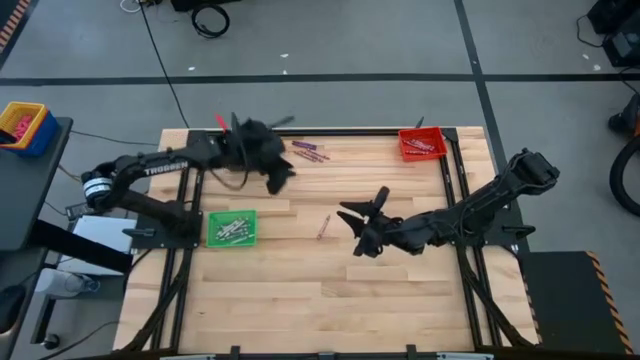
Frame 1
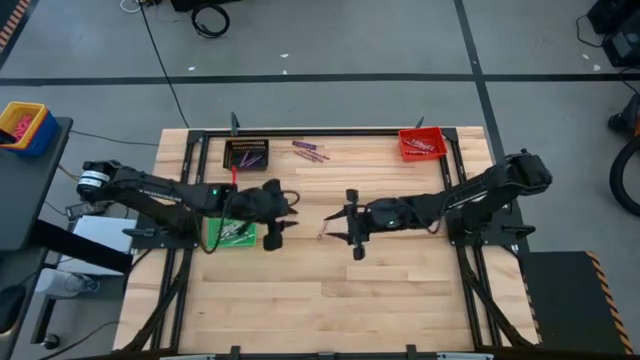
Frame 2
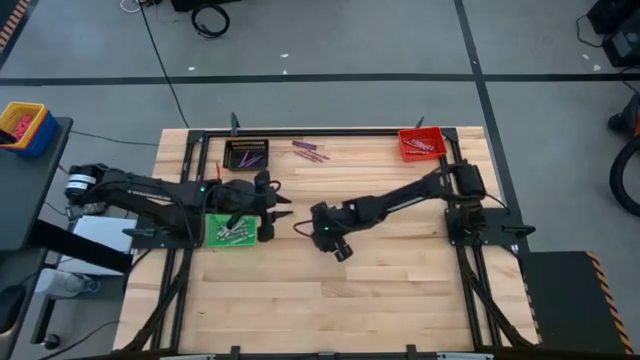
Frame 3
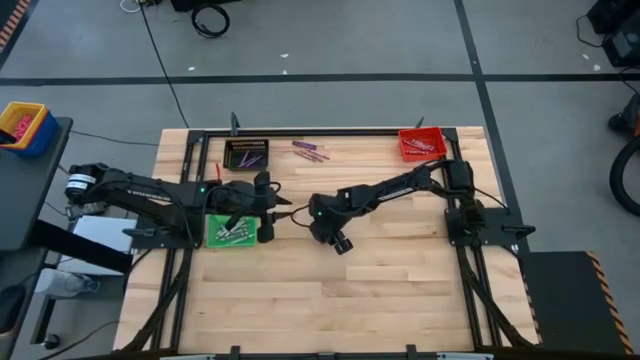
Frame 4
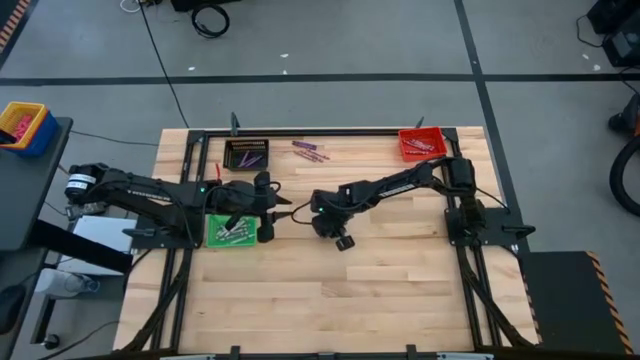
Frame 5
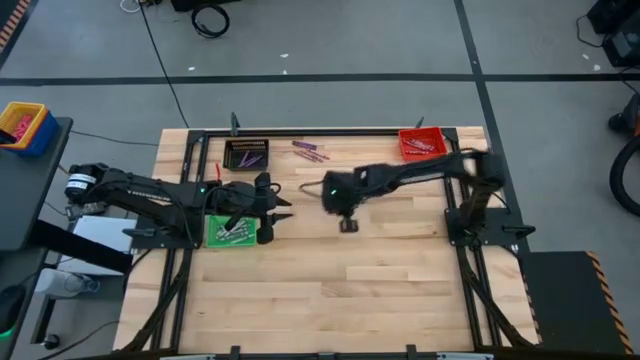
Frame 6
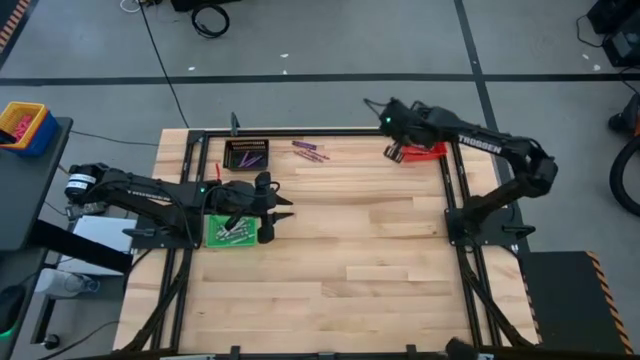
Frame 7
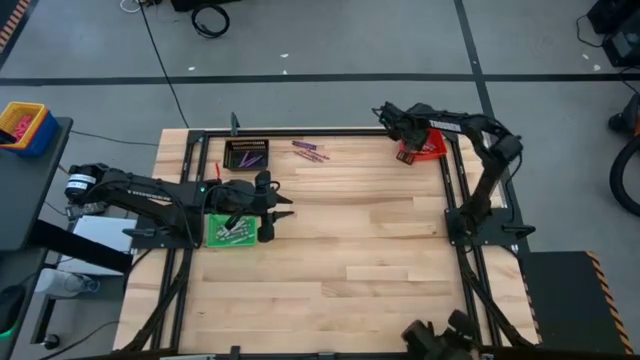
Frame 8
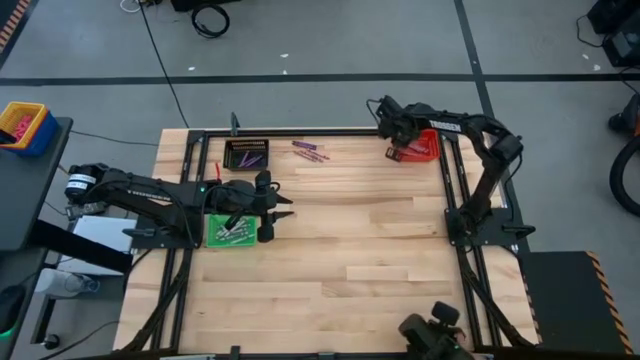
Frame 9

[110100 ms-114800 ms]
Task: Sort crayons
Put the pink crayon into the red bin

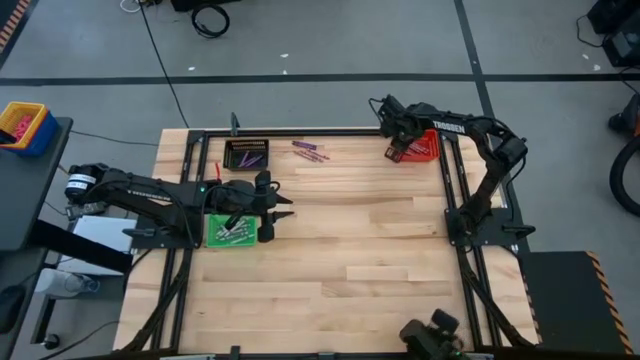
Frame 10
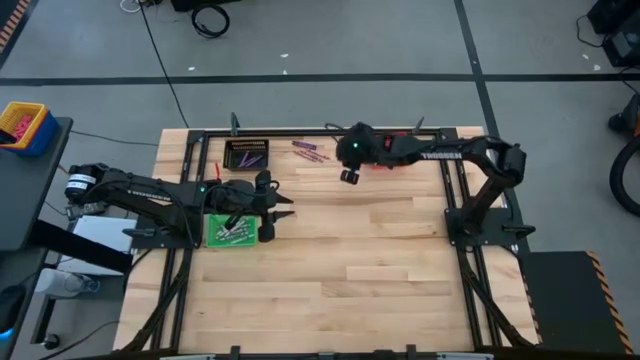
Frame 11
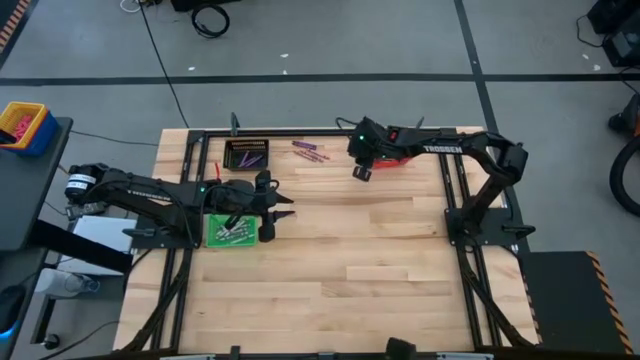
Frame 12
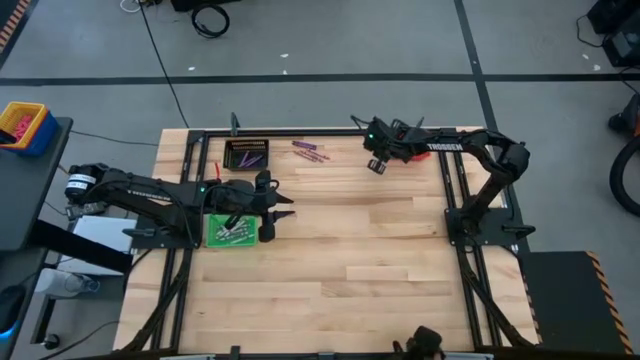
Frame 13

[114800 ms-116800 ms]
Adjust the red bin

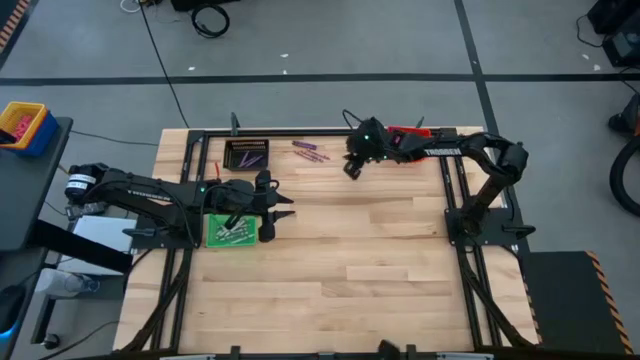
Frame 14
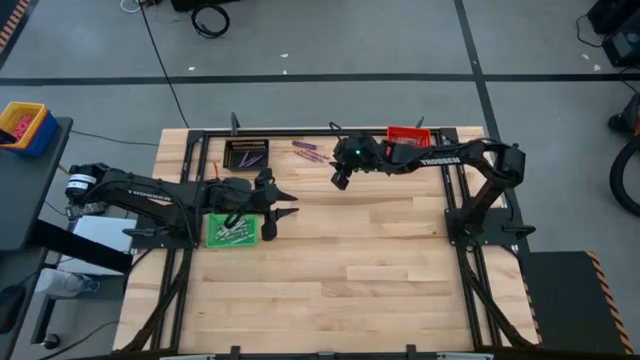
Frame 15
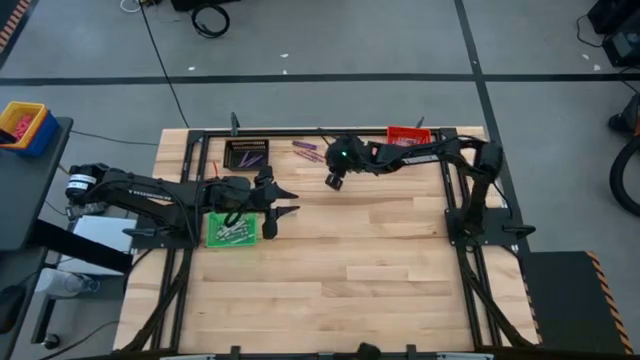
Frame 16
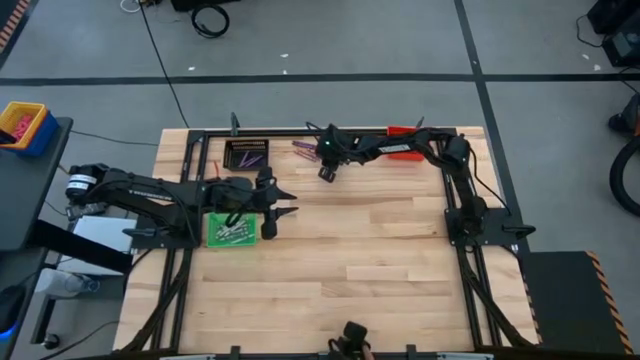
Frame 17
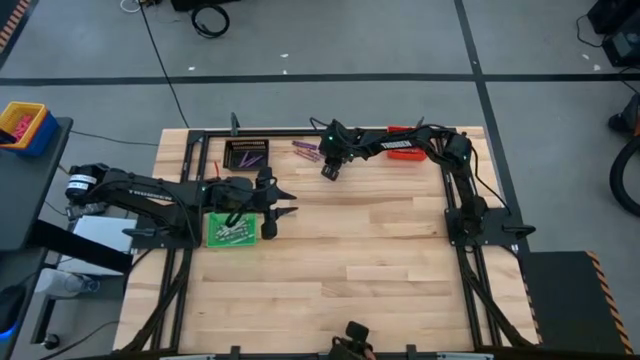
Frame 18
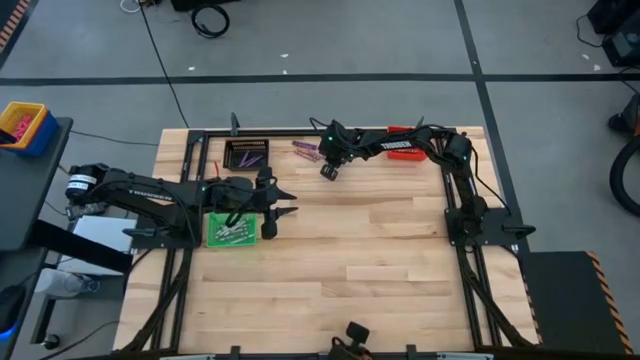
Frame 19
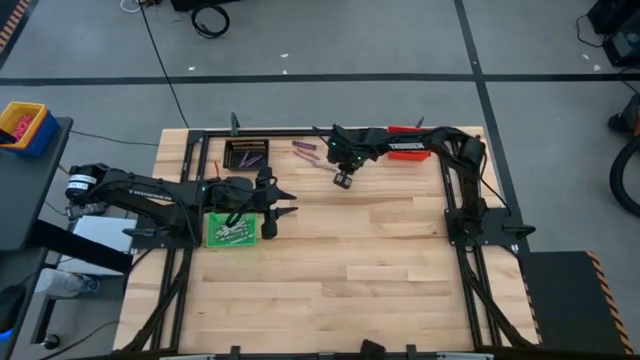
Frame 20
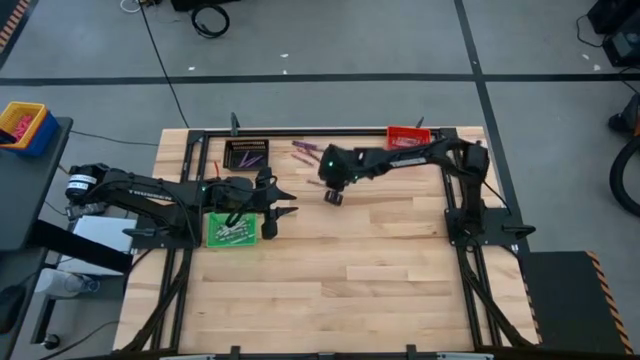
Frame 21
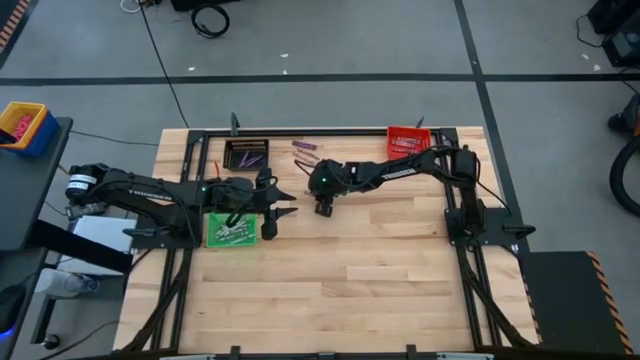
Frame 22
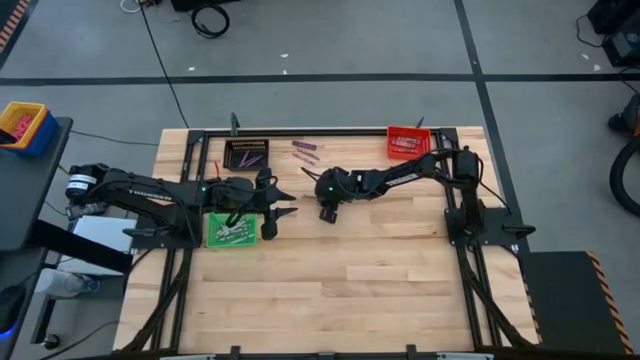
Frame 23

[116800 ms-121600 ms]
Put the pink crayon into the red bin

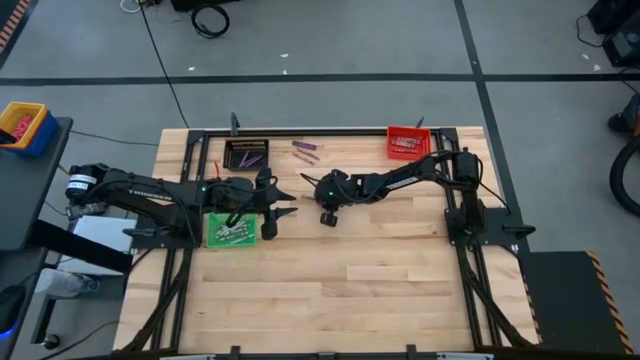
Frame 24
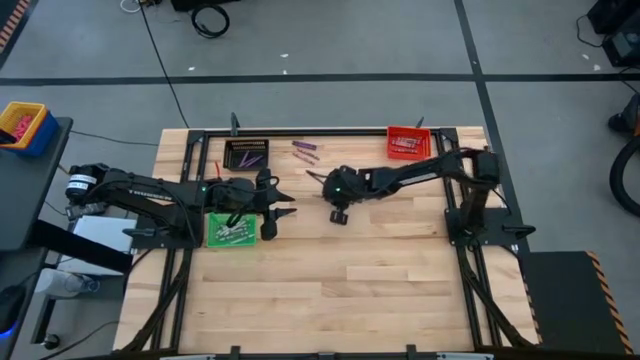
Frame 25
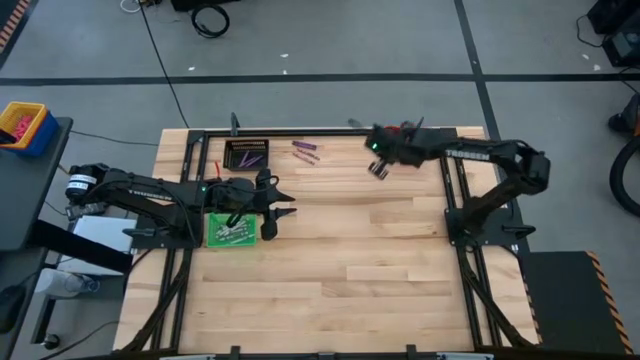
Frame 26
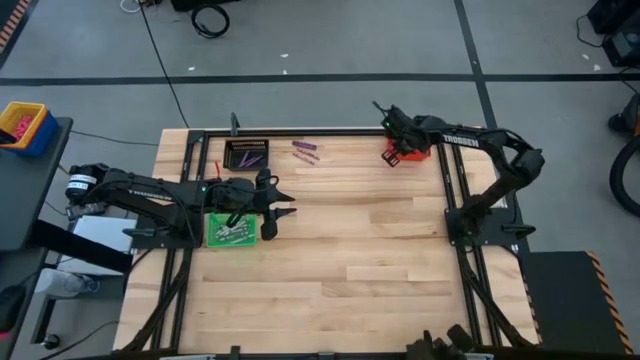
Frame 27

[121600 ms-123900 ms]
Put the pink crayon into the red bin

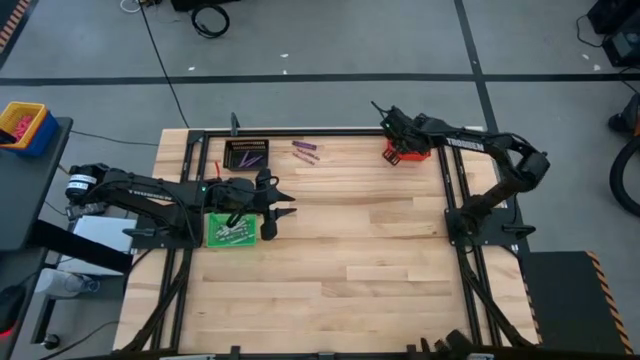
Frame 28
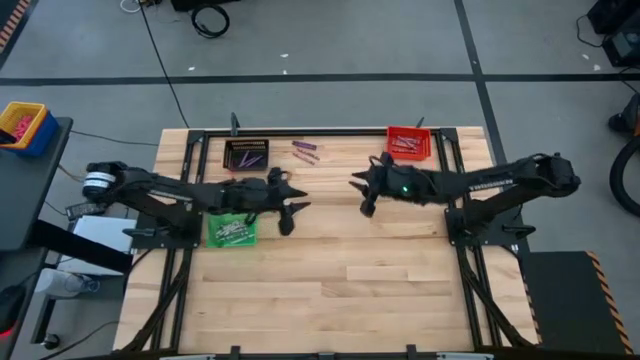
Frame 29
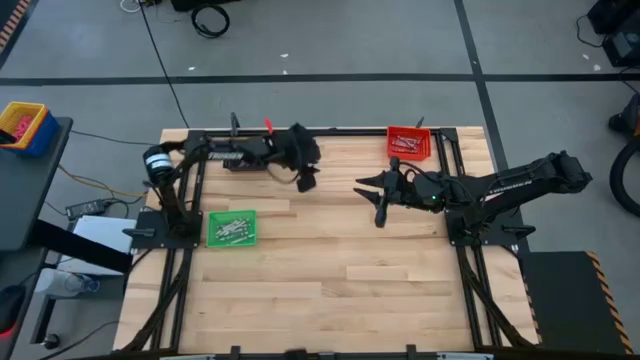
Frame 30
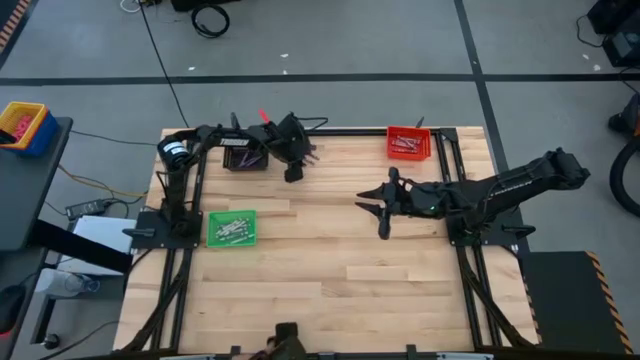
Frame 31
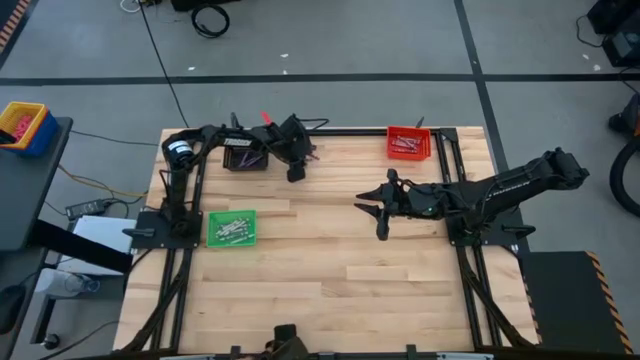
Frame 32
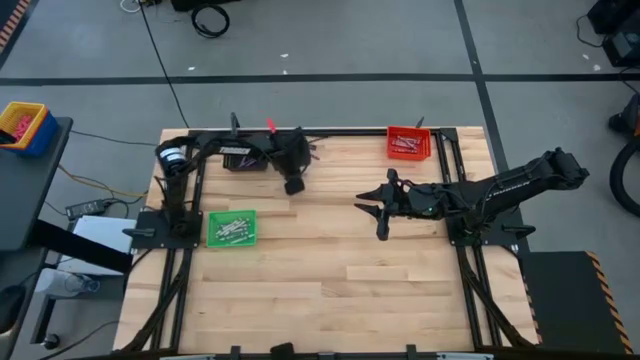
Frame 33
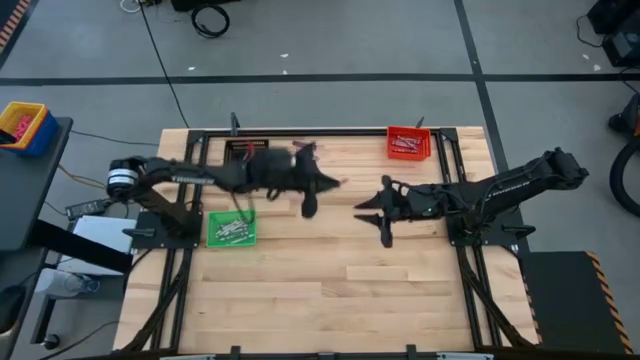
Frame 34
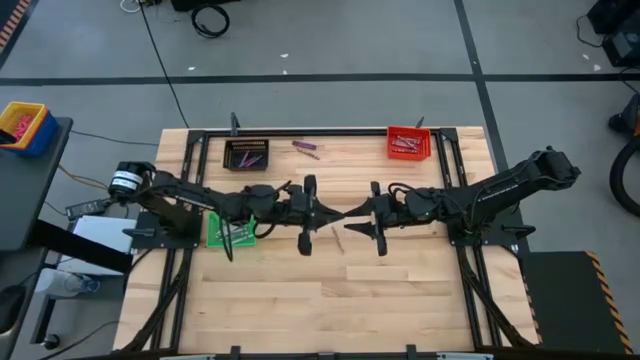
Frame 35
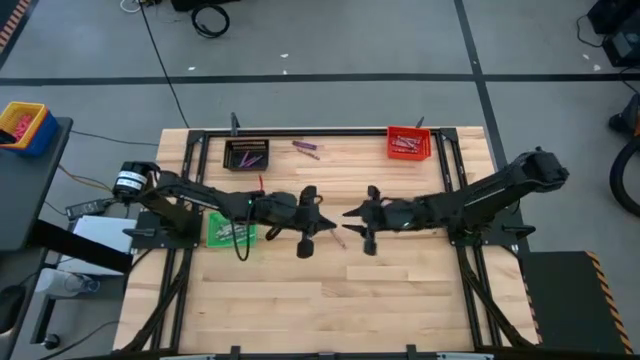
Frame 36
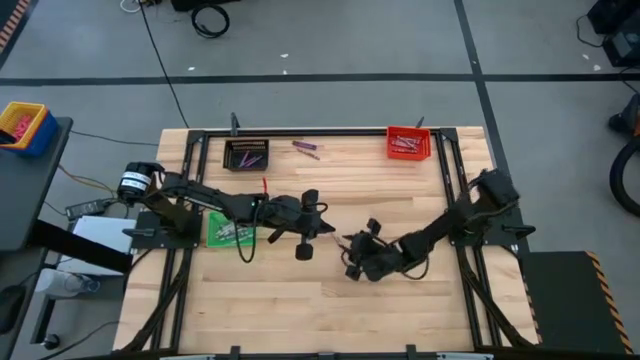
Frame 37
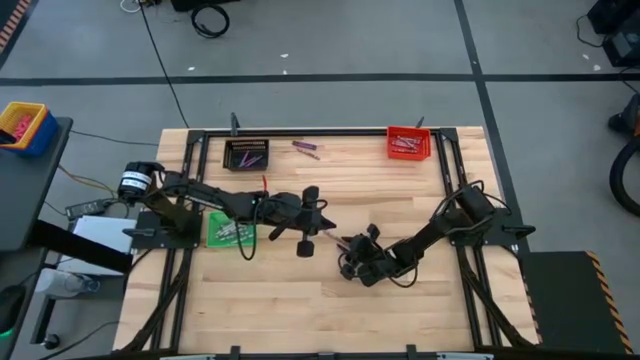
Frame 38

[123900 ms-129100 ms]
Put the pink crayon into the red bin

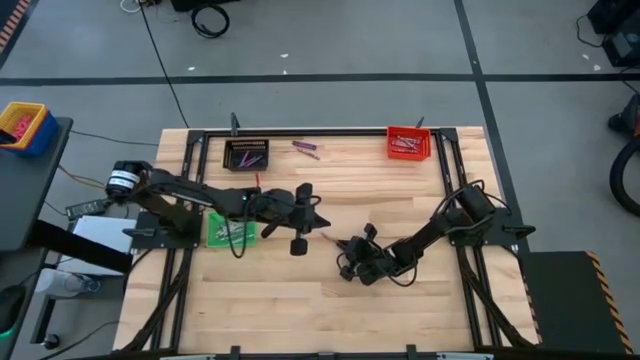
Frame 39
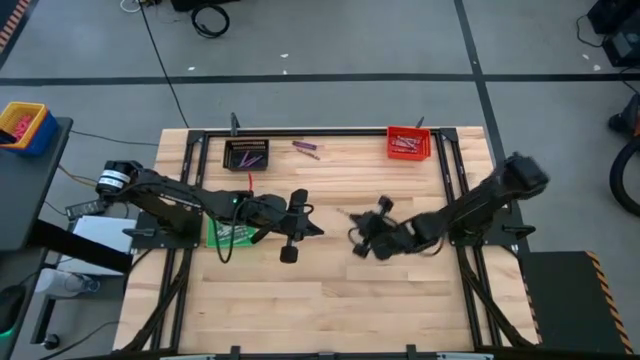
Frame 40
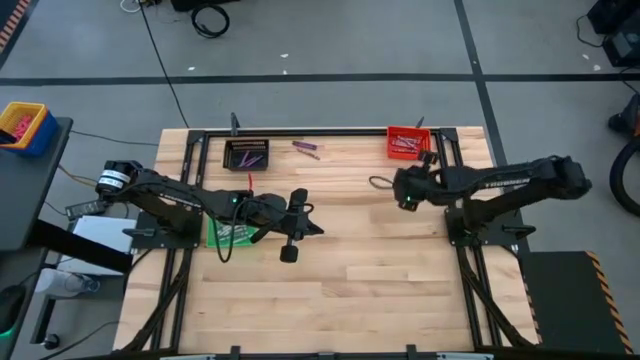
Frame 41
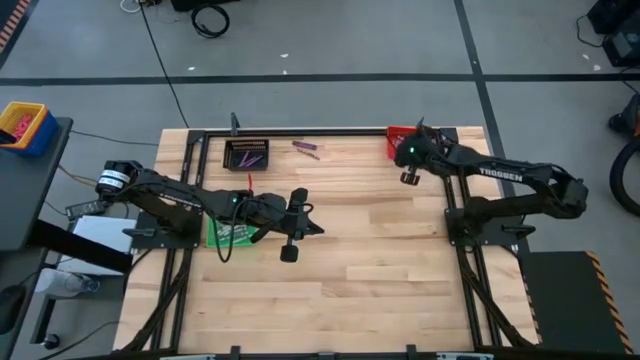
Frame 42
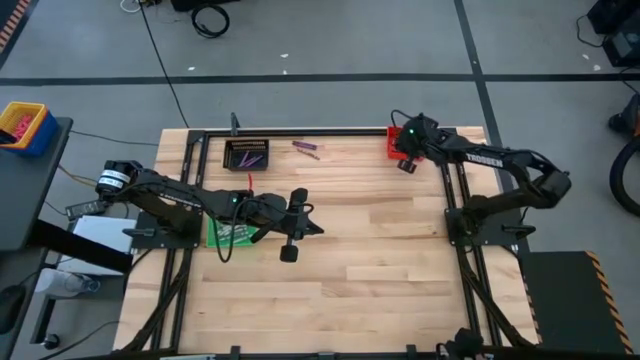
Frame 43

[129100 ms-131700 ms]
Put the pink crayon into the red bin
